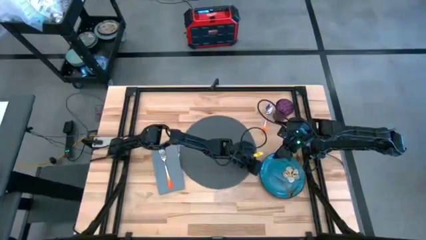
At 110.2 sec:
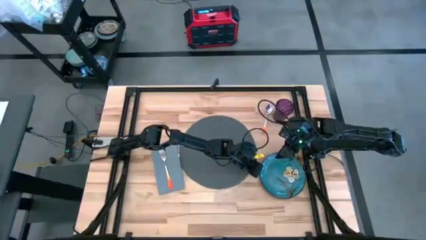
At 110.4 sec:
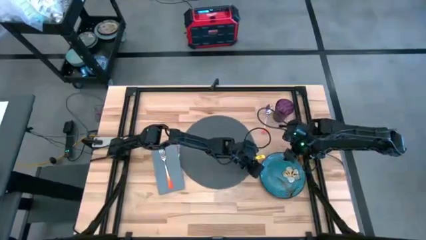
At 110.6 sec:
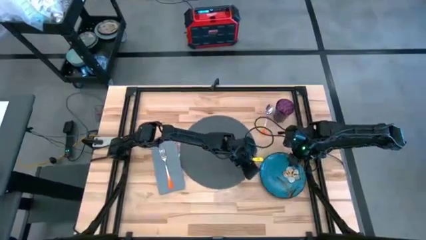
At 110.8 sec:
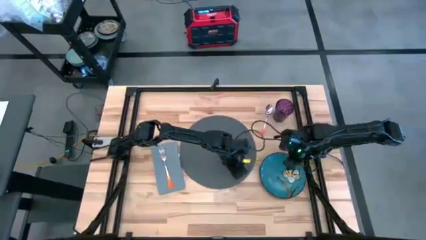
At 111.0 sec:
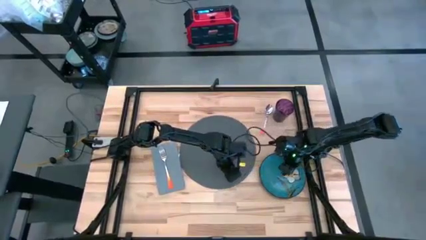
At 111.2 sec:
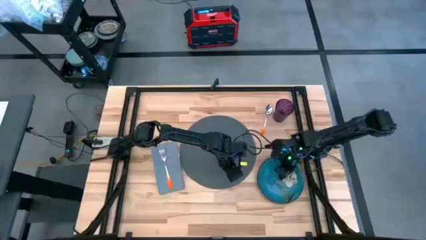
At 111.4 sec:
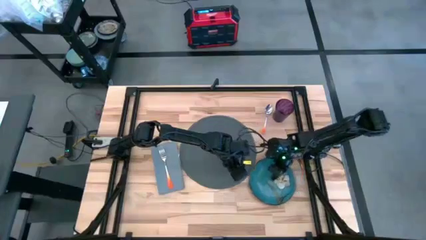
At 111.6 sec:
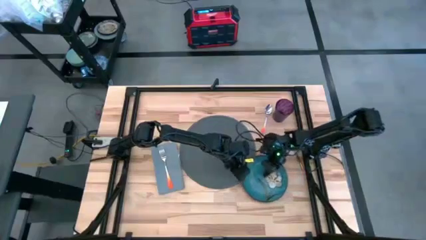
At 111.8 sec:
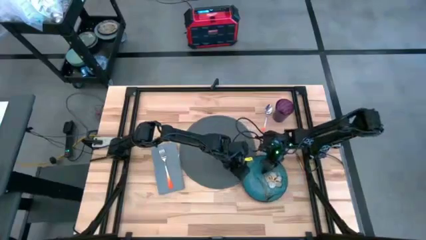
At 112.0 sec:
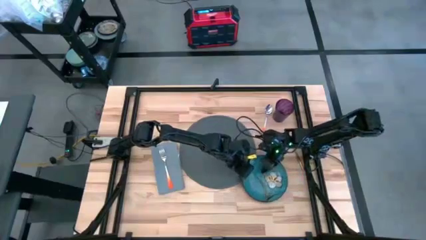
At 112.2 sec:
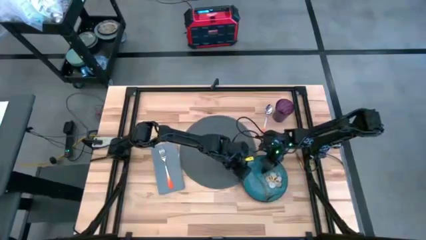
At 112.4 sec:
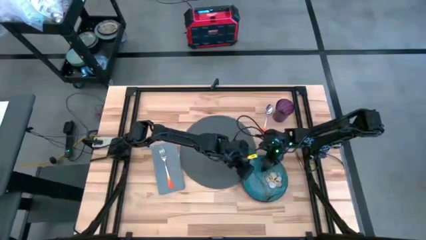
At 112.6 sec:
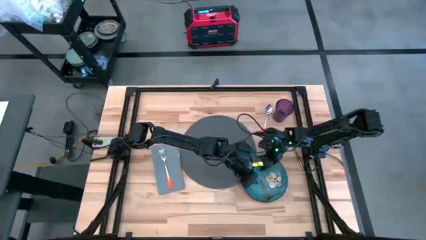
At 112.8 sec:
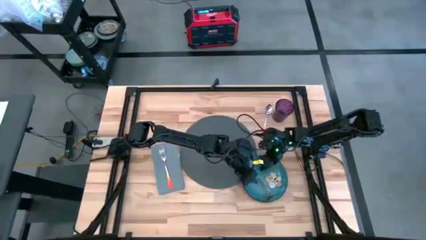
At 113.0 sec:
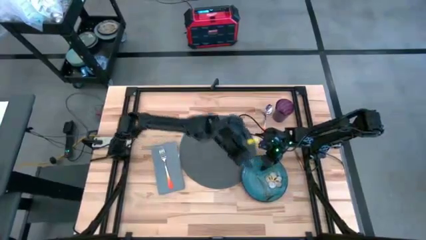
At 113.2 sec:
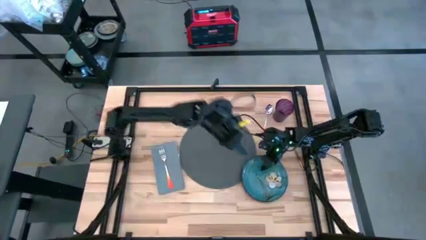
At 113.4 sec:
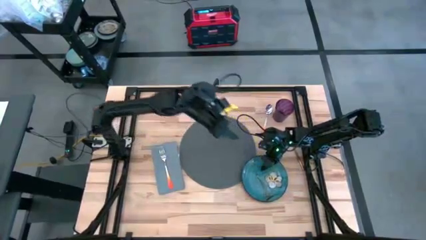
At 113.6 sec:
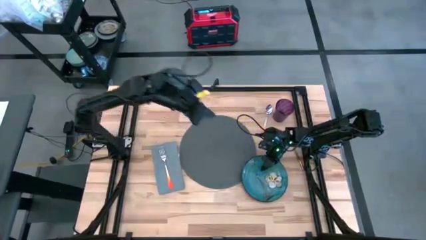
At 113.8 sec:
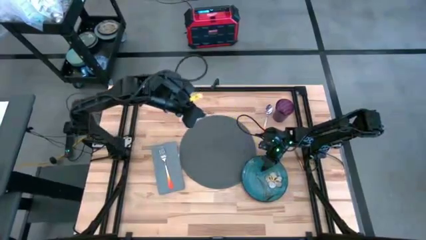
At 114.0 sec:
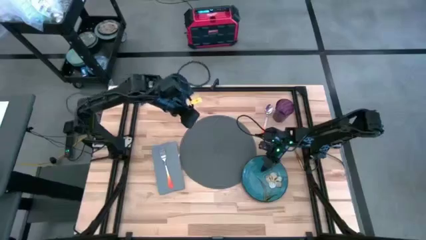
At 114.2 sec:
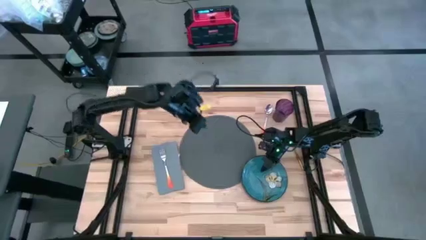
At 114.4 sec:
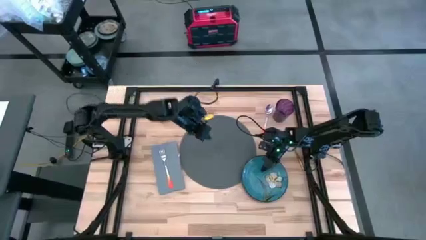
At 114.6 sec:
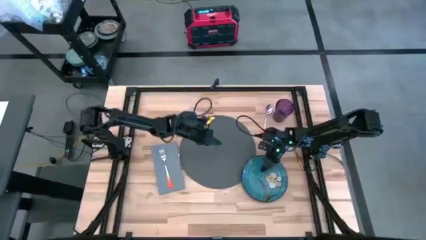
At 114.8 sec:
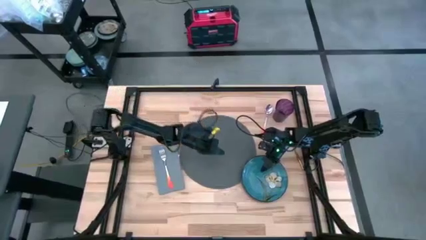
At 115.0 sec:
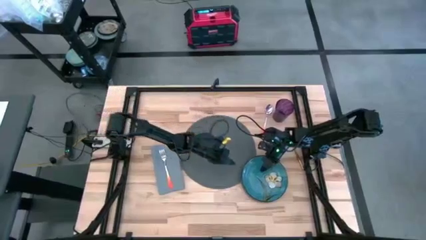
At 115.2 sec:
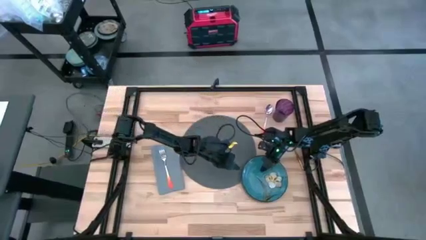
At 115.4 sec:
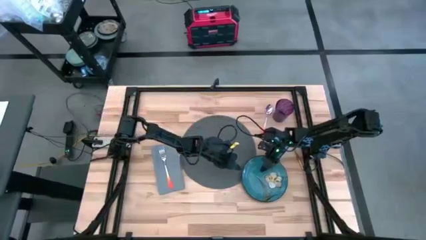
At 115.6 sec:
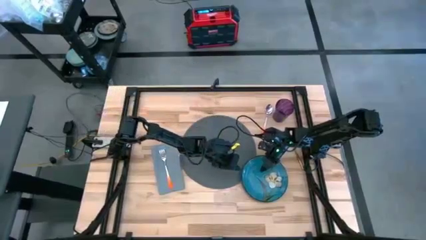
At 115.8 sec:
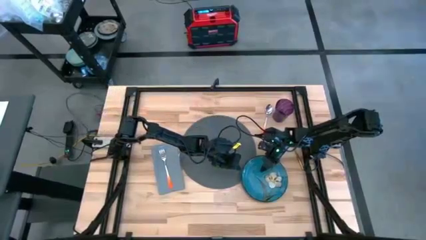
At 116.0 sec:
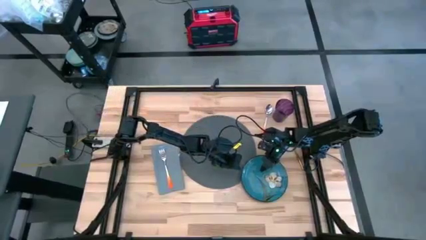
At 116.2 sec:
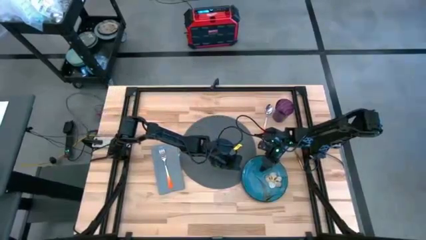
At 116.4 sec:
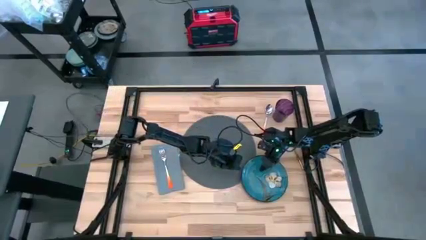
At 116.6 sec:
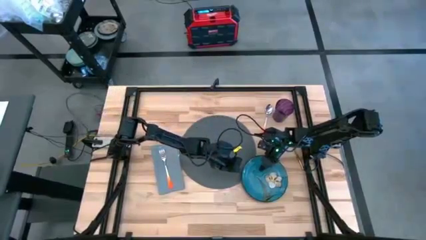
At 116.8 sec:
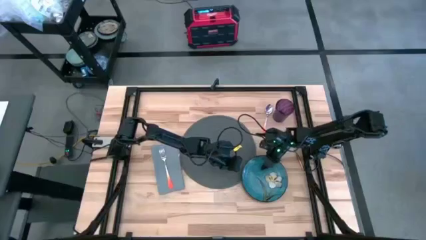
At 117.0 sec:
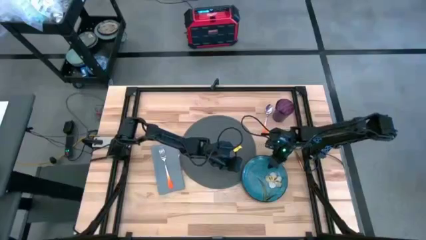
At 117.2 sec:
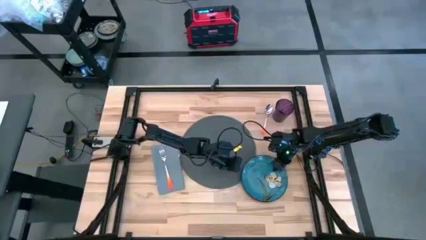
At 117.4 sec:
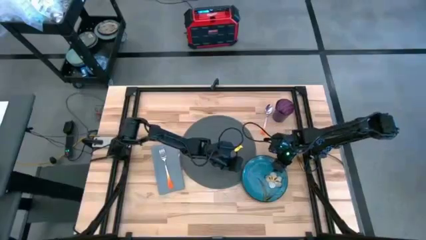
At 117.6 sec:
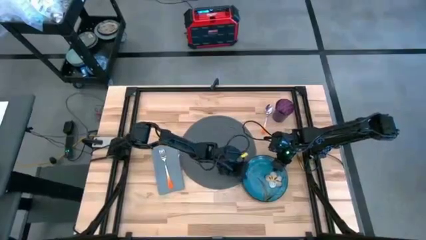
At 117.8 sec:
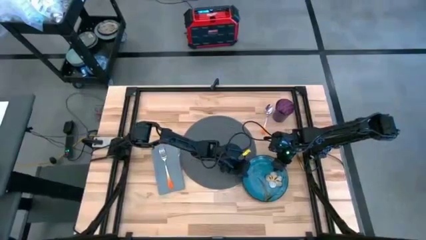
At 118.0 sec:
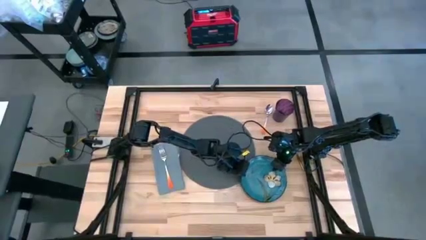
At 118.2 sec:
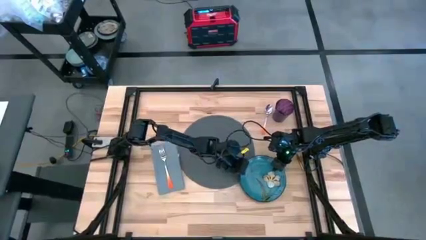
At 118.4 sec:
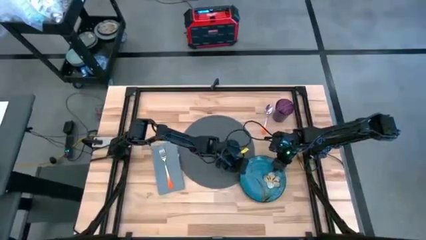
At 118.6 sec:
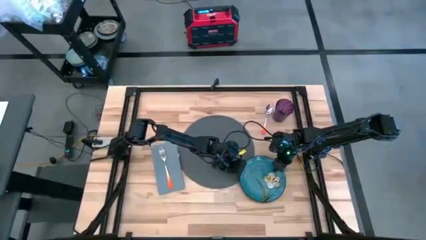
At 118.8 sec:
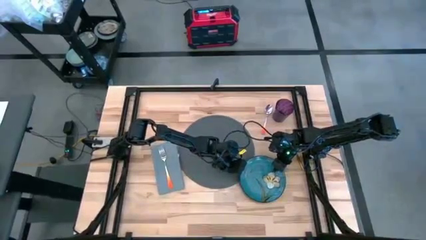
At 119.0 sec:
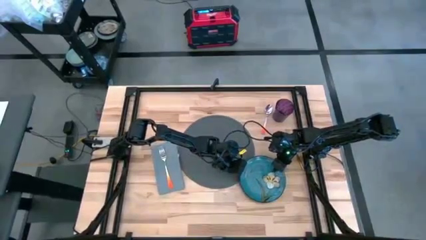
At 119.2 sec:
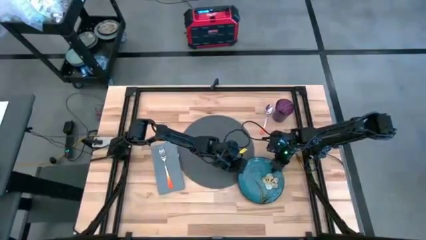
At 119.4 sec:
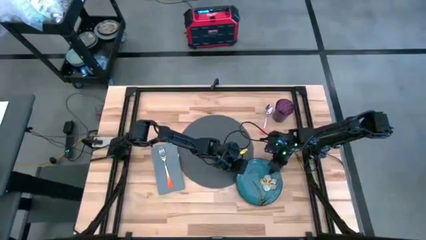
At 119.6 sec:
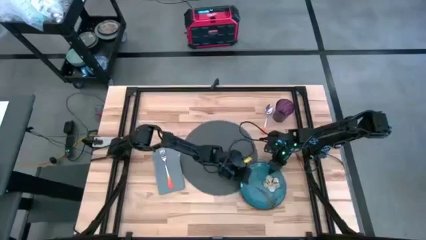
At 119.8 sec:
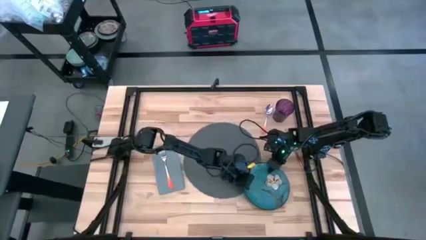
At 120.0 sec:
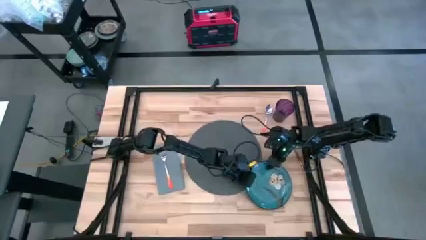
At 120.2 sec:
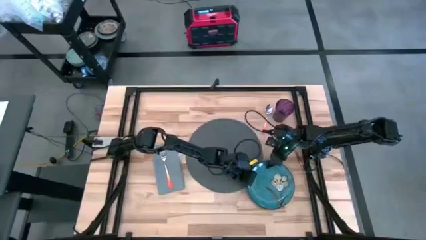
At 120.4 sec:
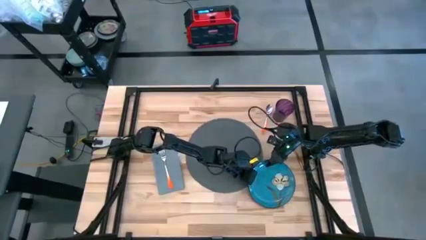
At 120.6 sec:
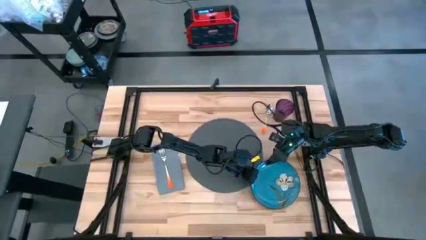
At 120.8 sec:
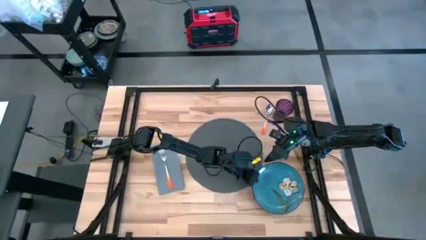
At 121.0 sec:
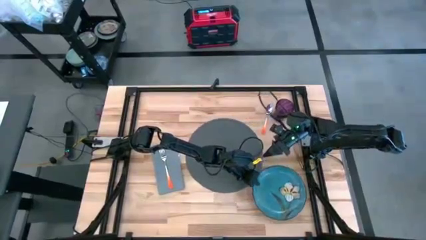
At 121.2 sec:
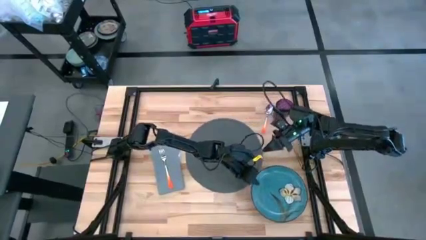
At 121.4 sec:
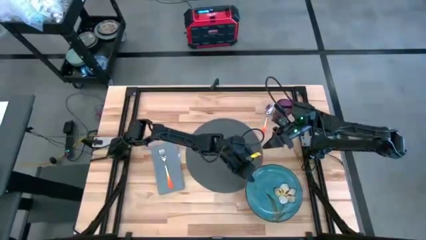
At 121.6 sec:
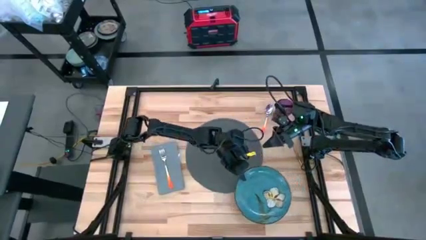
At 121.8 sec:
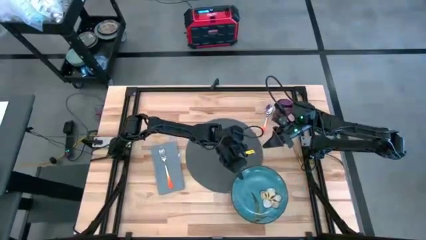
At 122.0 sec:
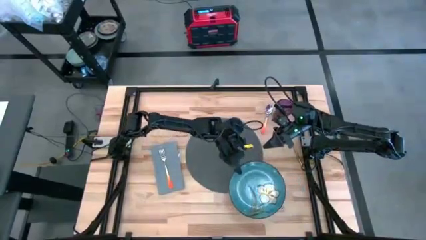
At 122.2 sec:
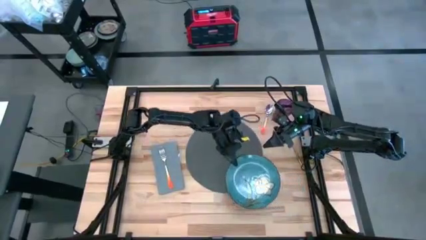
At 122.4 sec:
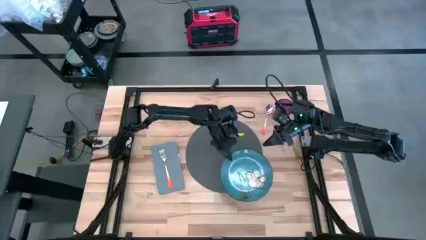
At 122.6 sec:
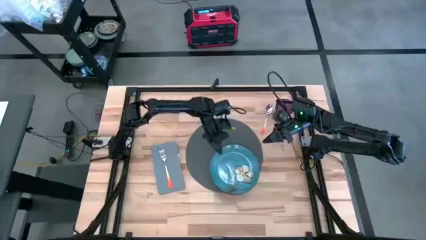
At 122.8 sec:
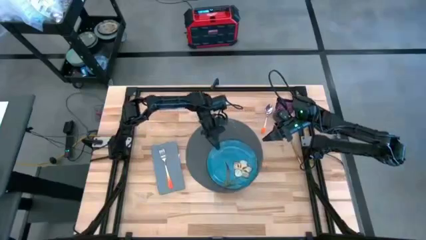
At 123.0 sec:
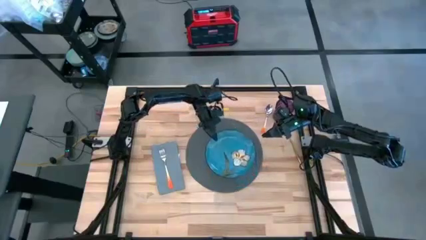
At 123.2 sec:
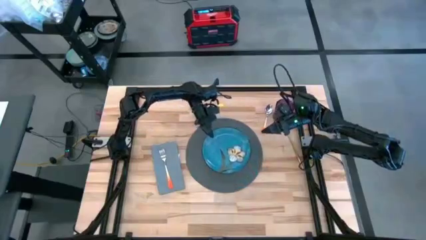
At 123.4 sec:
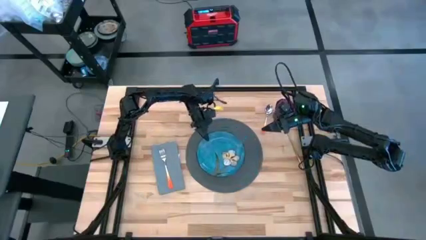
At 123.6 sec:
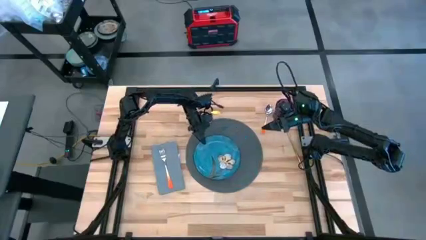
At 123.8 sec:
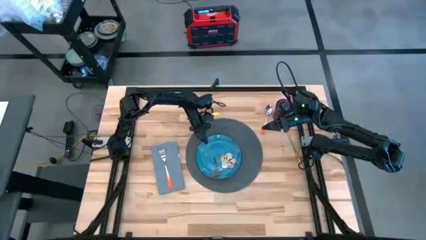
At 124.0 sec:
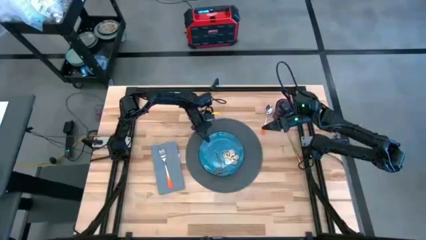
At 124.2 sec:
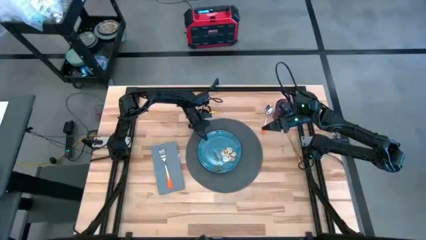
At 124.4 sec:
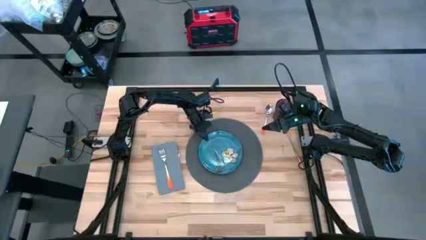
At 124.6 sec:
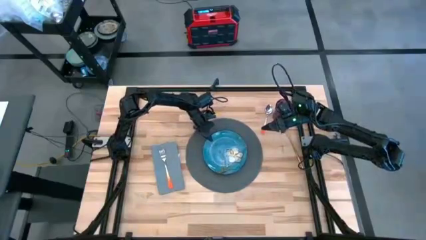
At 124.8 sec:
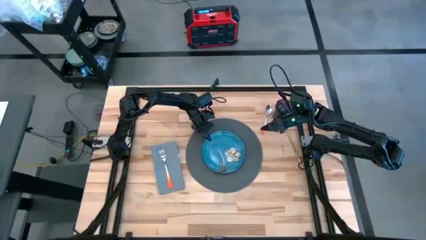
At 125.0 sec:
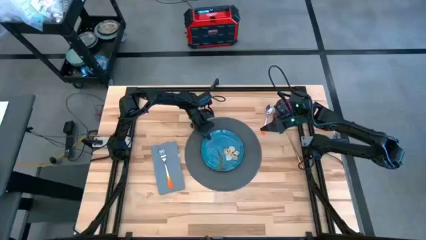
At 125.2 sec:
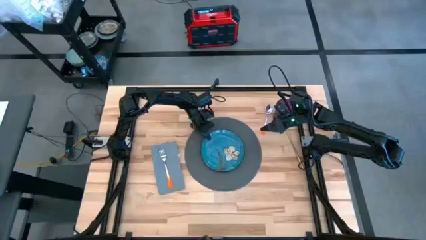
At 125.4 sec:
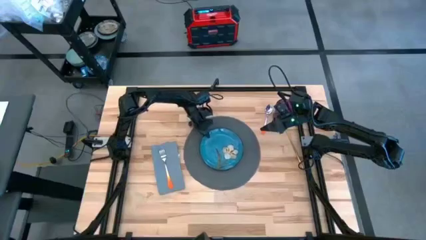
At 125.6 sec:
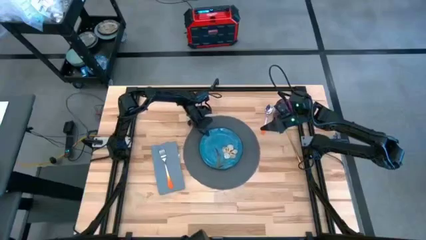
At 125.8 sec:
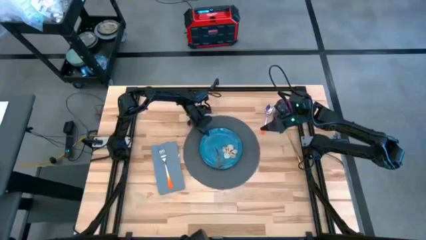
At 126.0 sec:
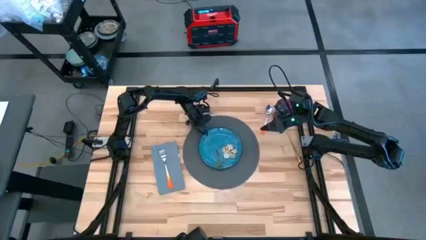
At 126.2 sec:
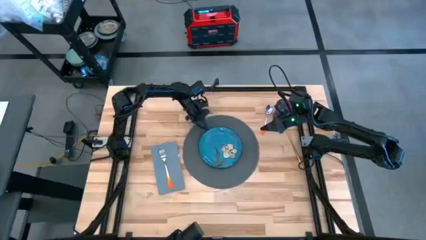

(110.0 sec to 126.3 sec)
Task: Set table place
Put the blue plate on top of the gray placemat
